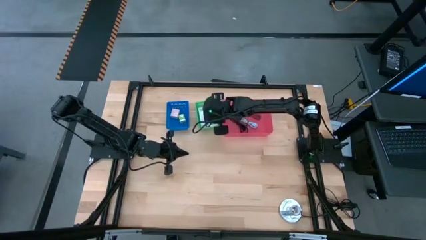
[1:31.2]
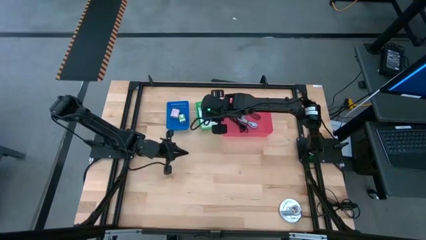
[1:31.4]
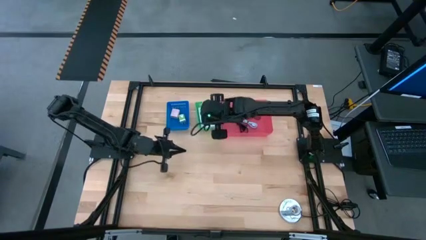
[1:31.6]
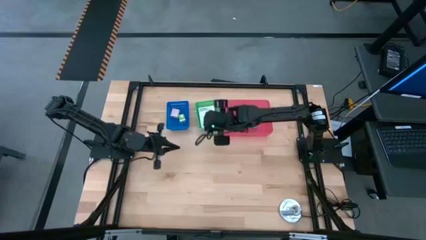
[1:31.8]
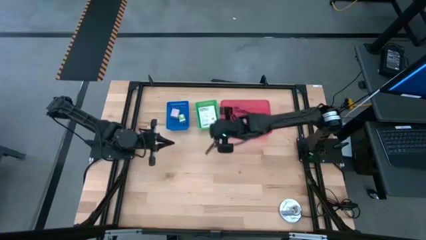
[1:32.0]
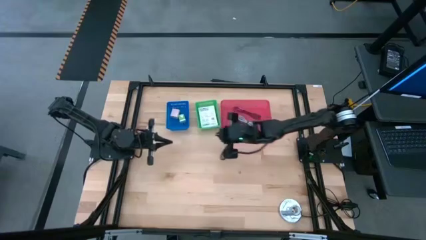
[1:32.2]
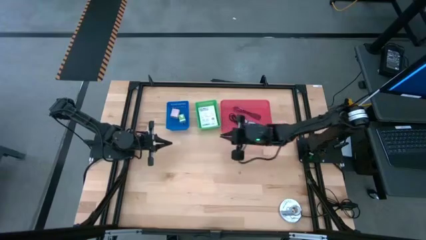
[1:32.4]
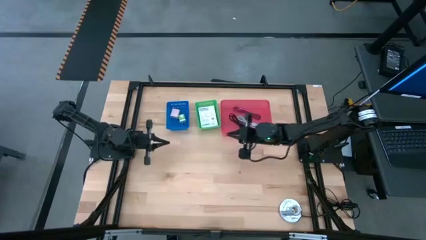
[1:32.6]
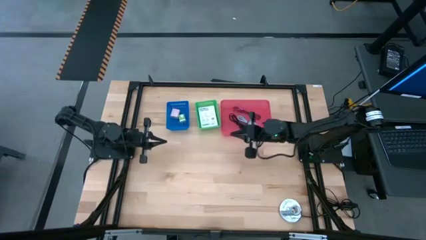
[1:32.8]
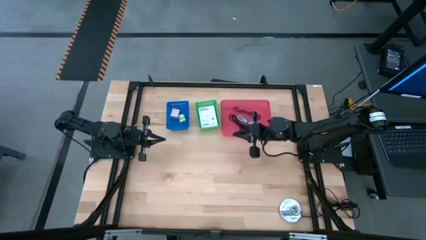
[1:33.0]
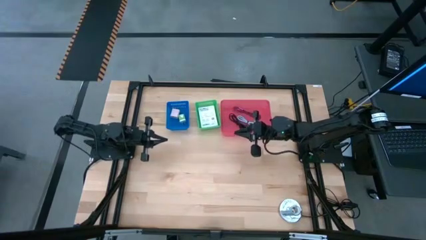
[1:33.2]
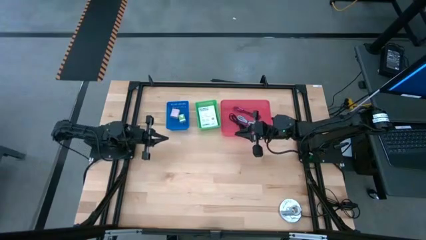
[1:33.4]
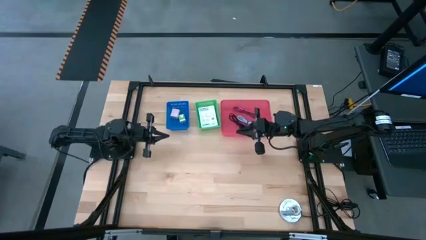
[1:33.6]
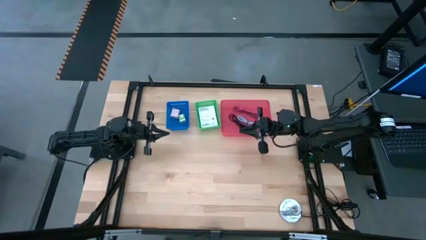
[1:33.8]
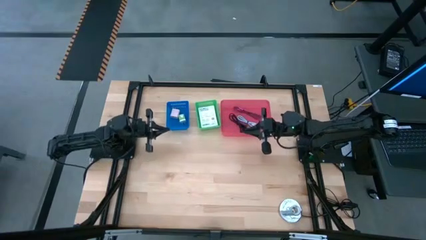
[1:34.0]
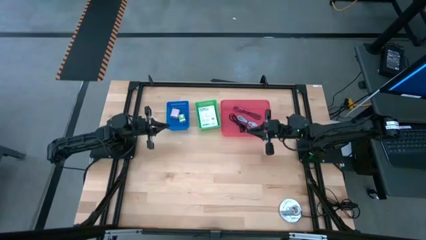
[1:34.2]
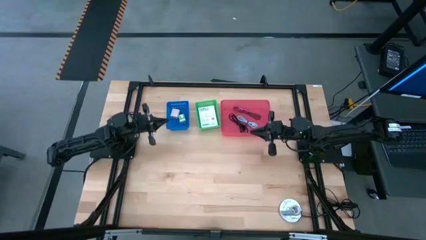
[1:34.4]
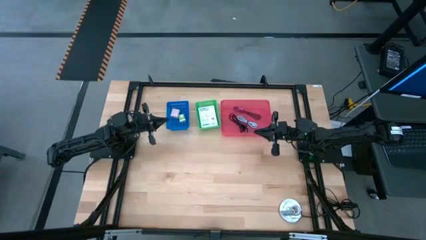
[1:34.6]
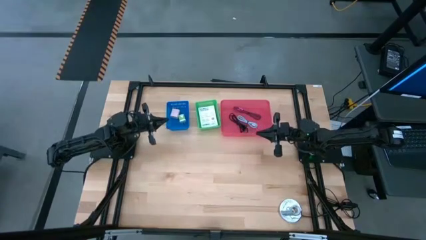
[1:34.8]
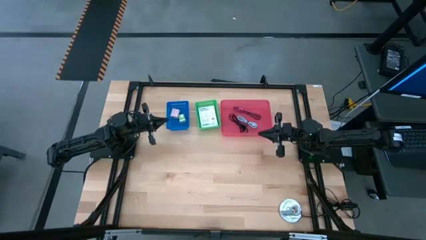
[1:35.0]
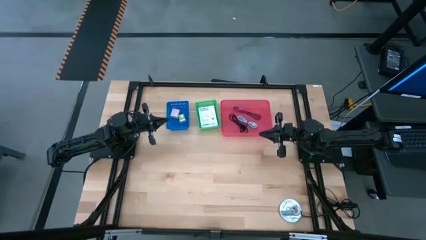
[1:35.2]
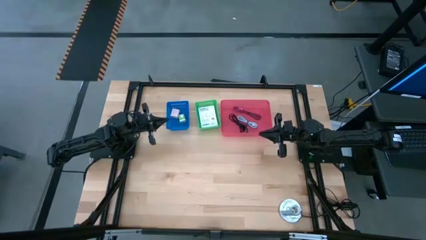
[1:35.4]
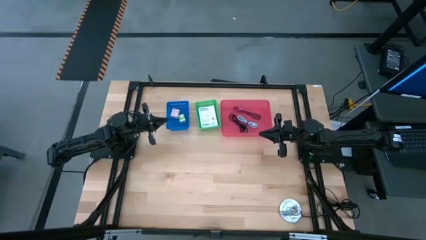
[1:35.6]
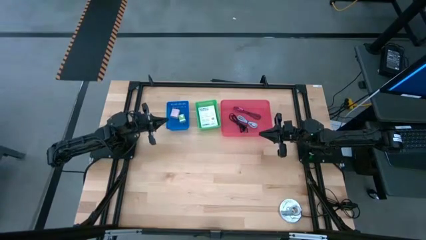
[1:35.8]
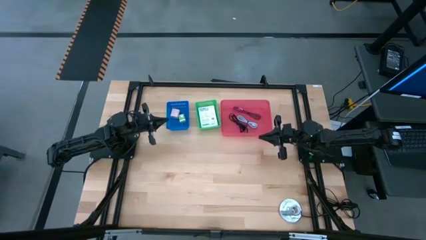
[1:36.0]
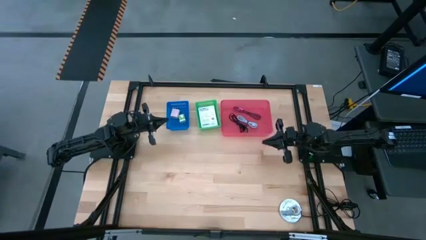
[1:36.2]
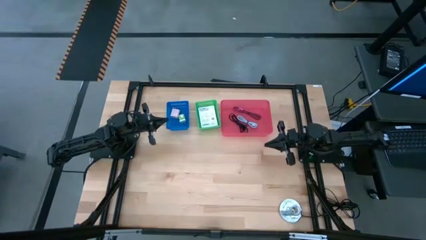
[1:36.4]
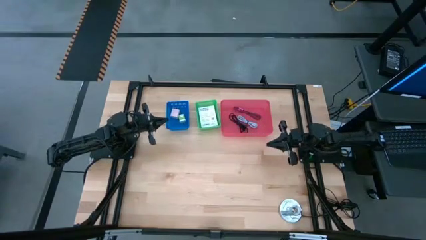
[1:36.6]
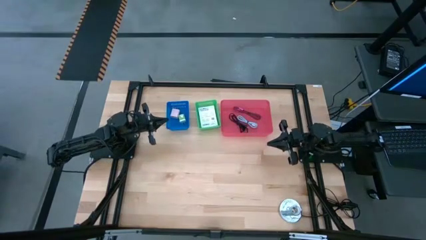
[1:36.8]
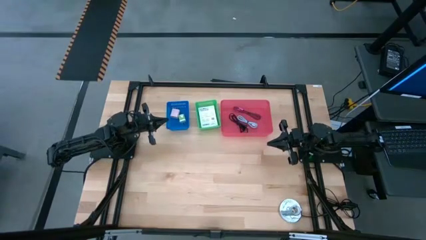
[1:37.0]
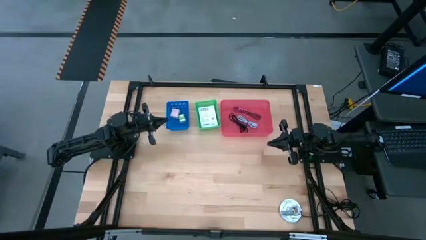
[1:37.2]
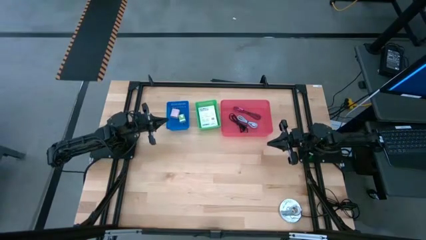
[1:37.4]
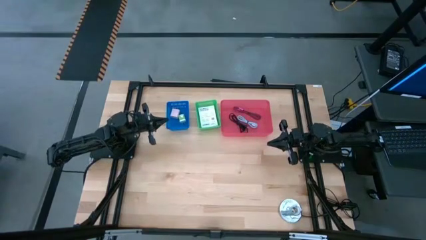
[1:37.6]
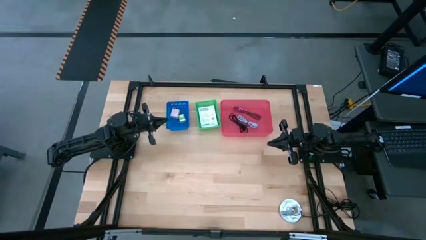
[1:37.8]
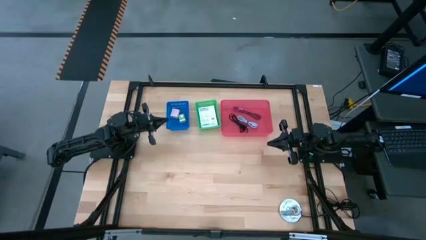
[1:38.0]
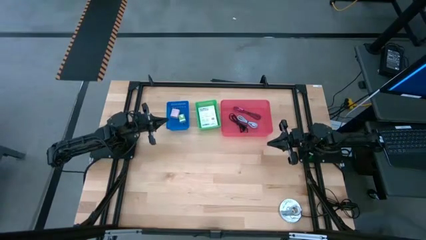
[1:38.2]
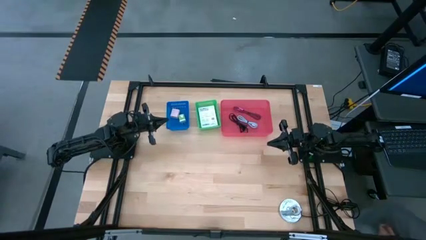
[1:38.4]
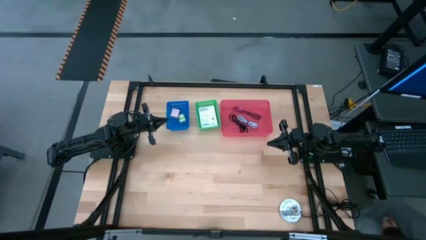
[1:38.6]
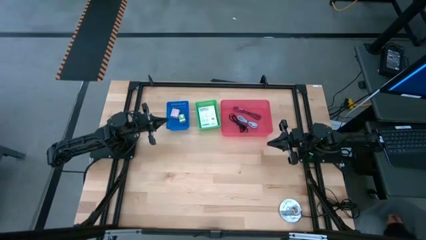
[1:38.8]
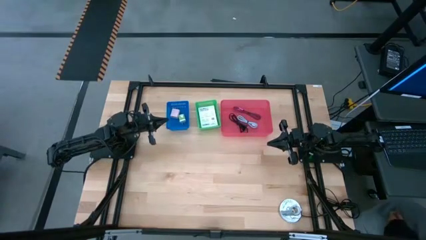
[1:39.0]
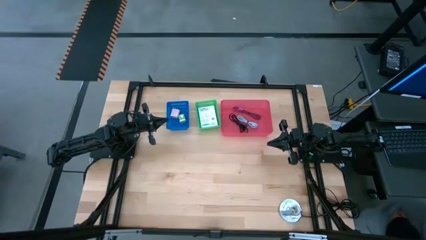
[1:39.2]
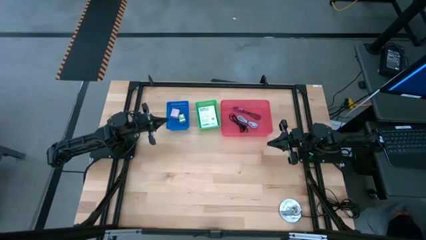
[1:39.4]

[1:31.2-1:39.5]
Task: Pick and place items into bin
Return to Home Position

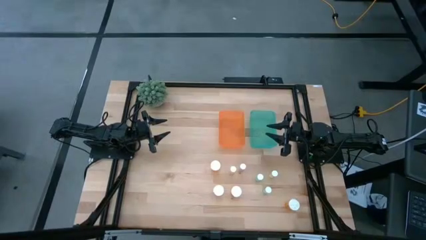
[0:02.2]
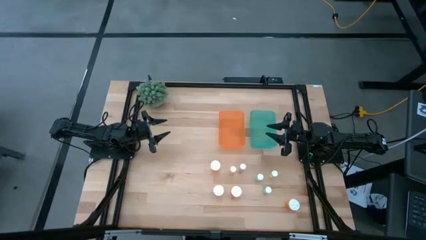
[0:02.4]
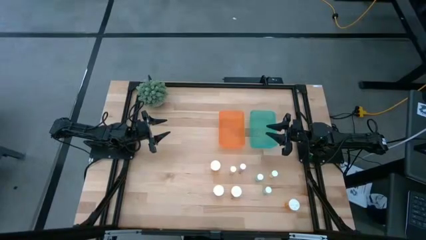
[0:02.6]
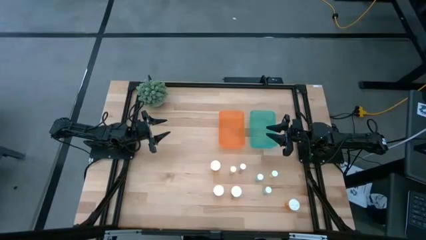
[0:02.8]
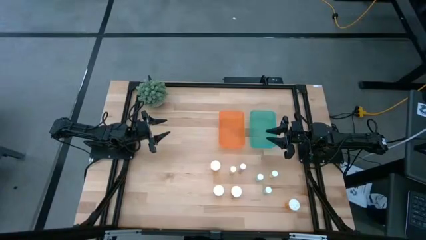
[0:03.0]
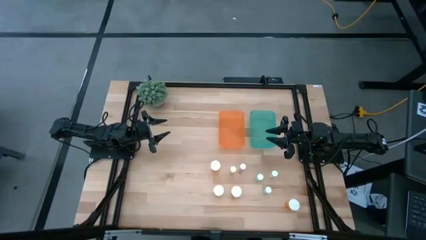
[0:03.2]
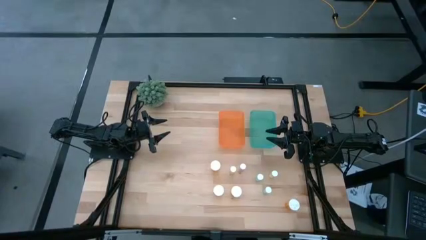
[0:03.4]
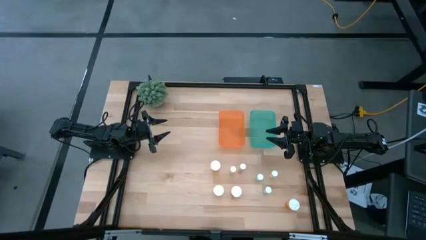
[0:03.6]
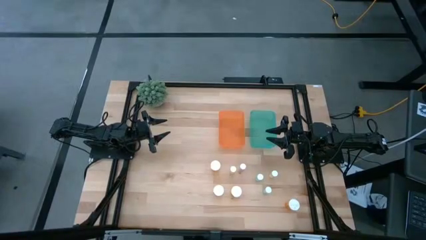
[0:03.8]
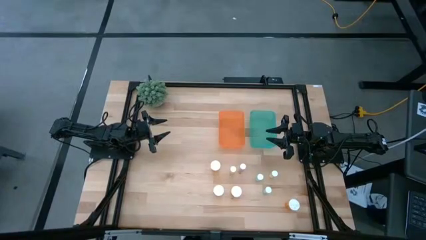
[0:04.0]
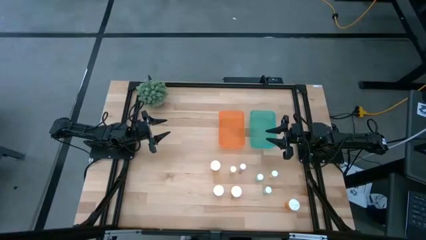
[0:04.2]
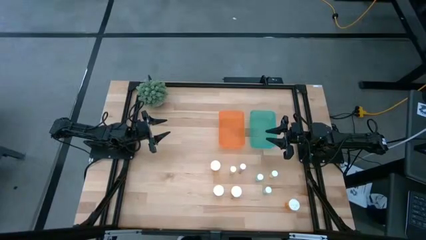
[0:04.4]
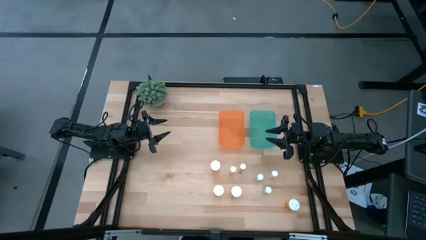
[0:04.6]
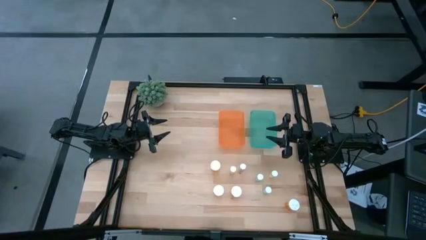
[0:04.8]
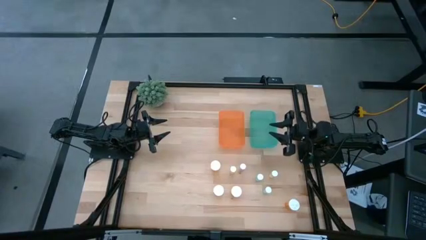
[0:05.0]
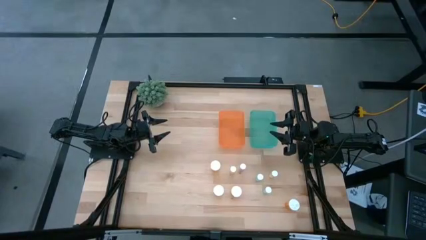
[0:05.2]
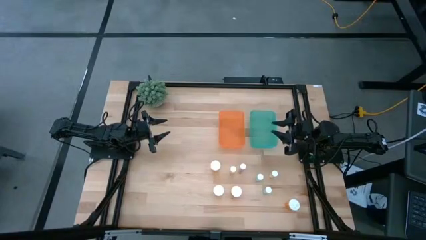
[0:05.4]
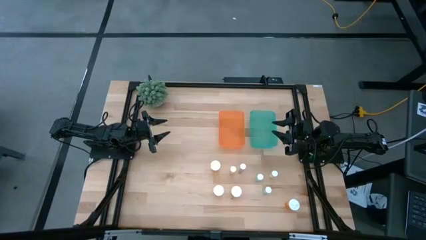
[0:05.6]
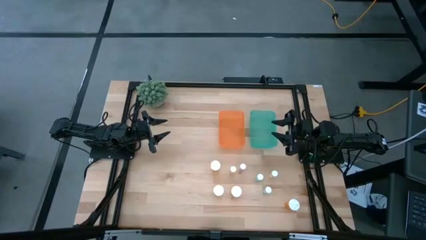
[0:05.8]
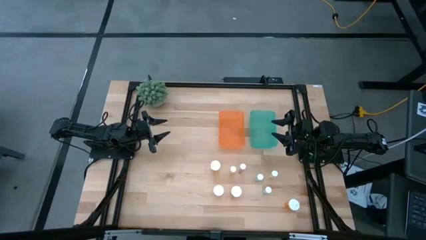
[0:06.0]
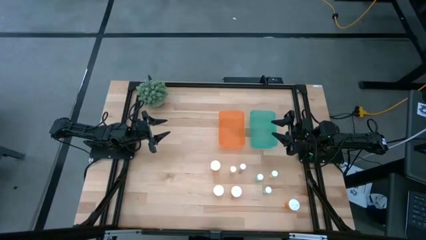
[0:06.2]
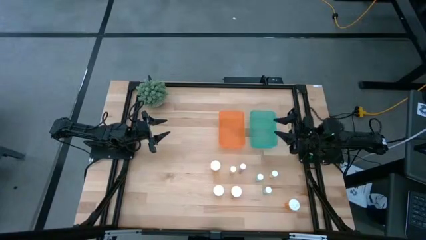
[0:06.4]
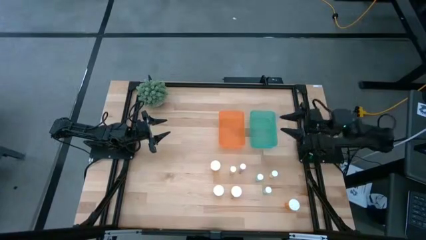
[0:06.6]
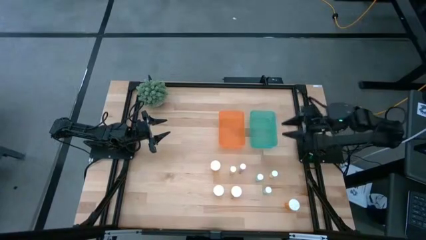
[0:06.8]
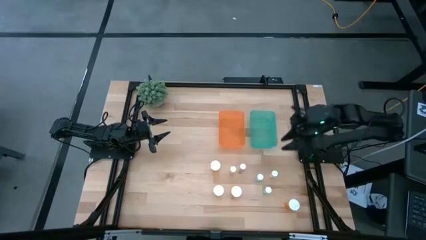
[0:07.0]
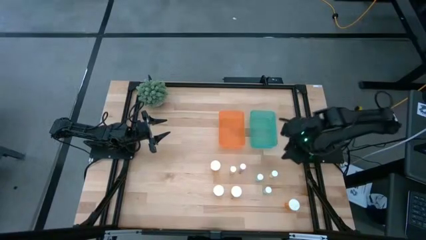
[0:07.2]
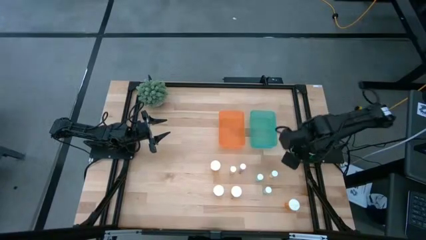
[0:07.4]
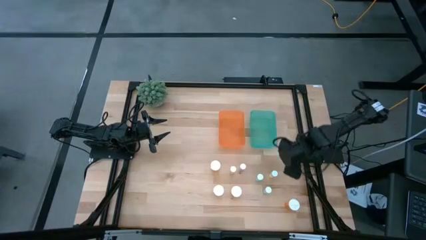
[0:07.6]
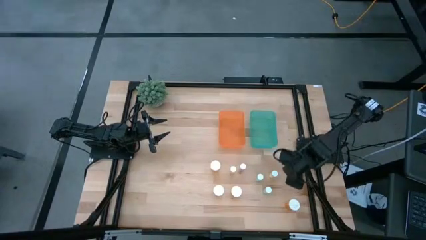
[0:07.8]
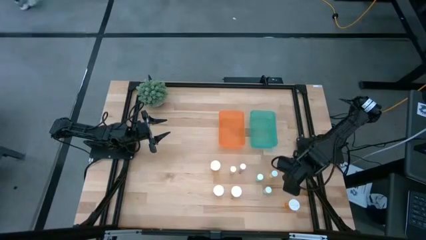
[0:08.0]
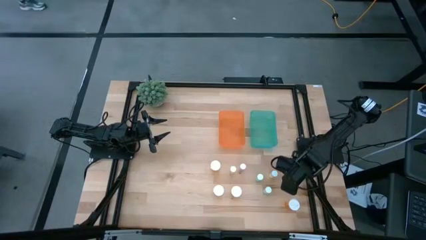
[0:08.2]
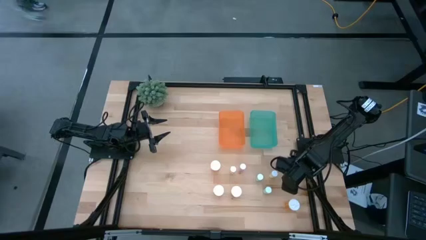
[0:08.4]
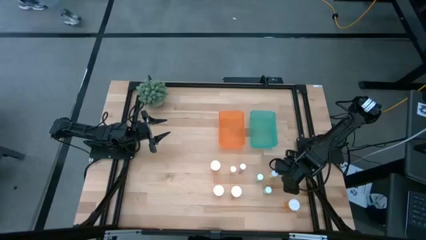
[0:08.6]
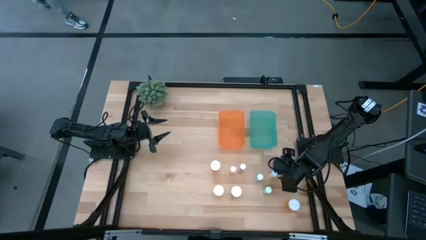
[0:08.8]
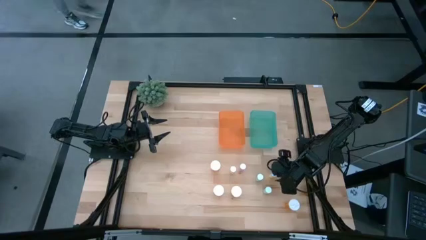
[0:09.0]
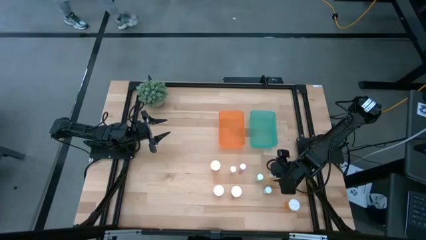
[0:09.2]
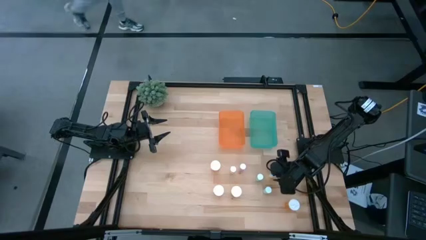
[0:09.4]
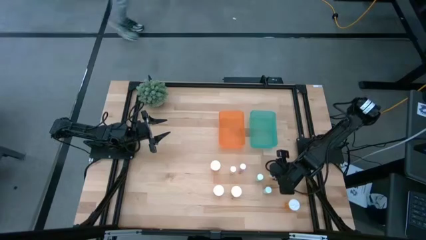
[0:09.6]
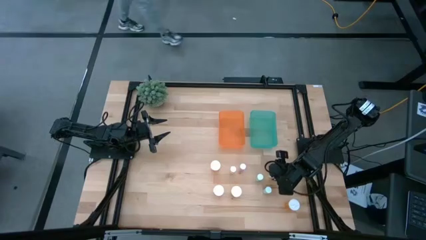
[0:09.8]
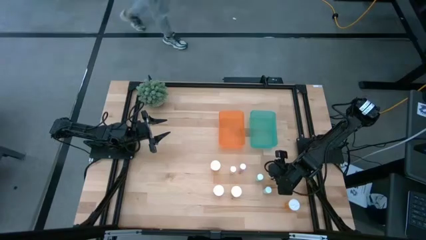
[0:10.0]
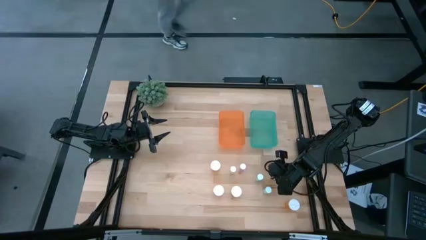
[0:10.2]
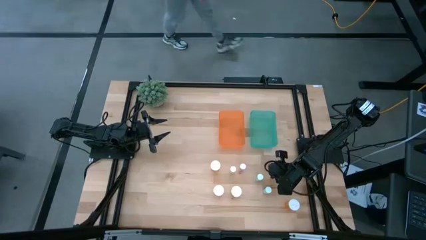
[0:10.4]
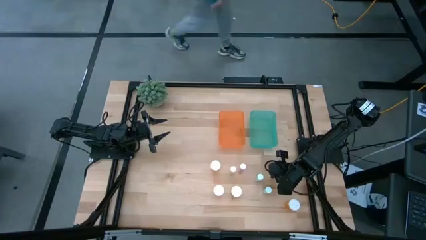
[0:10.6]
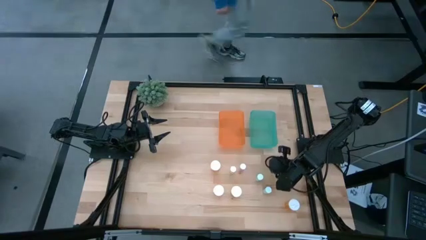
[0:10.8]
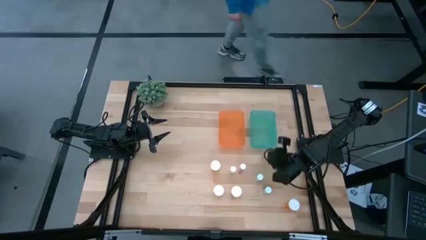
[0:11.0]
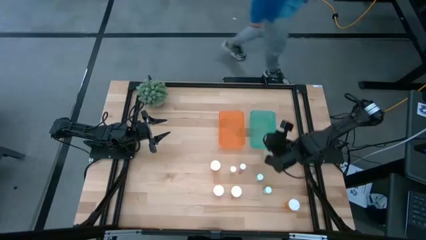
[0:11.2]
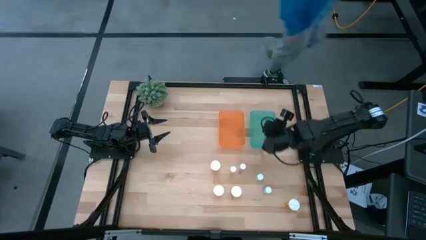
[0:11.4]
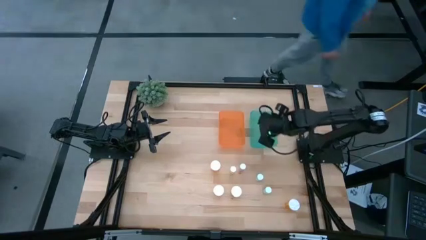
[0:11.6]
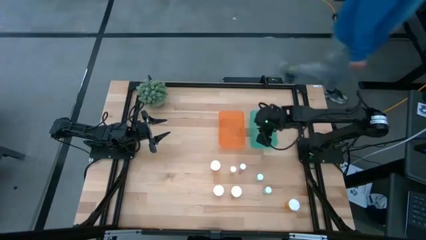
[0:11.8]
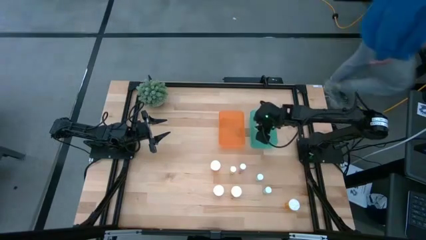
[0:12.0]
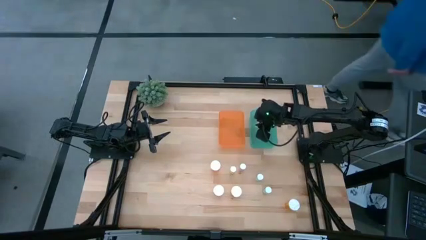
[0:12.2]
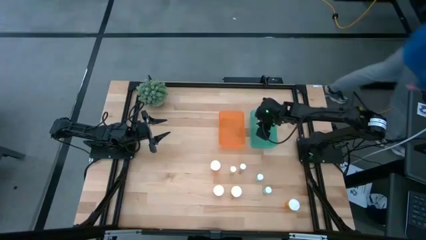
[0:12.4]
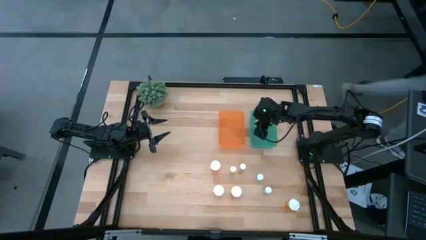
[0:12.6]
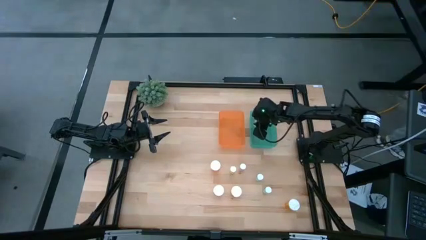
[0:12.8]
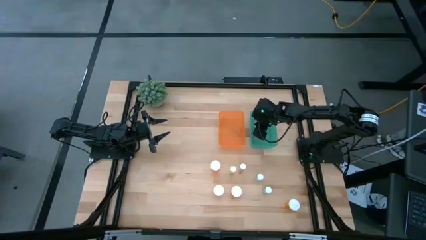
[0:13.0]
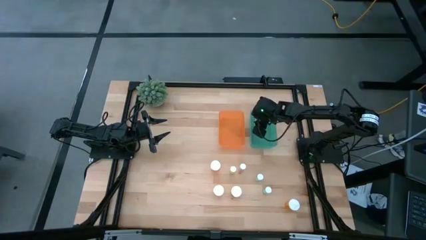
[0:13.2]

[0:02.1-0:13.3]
Task: Pick and place medicine bottles into bin by pill shape (circle, oval)
Put the right small yellow pill bottle into the green bin
